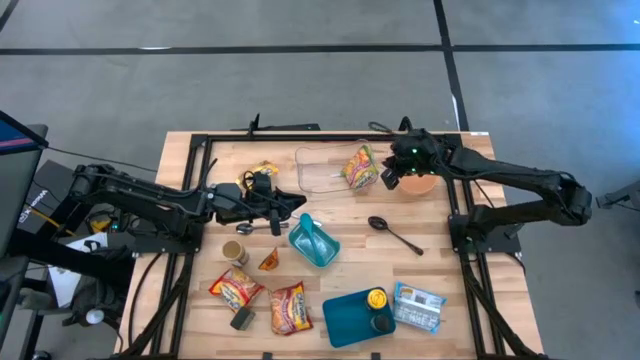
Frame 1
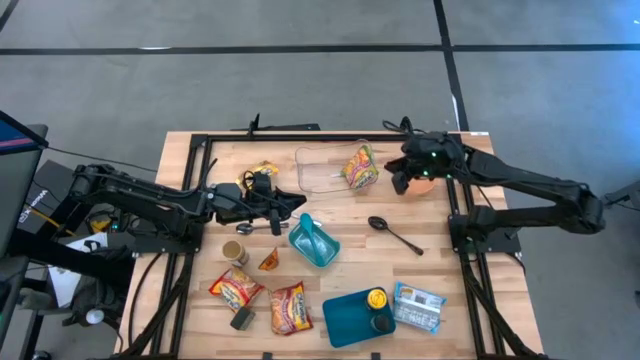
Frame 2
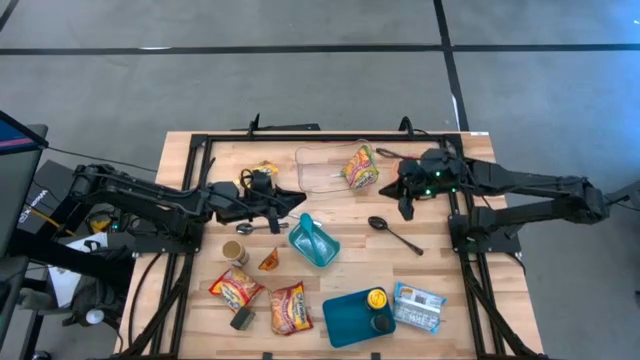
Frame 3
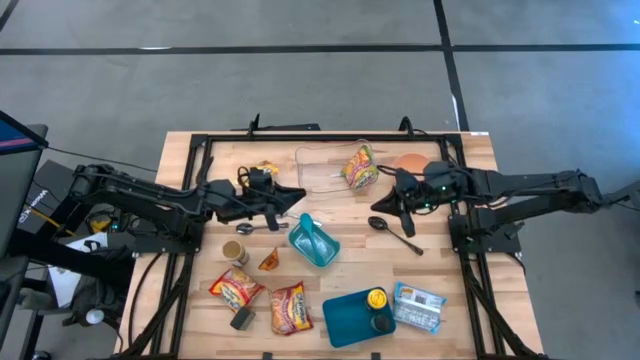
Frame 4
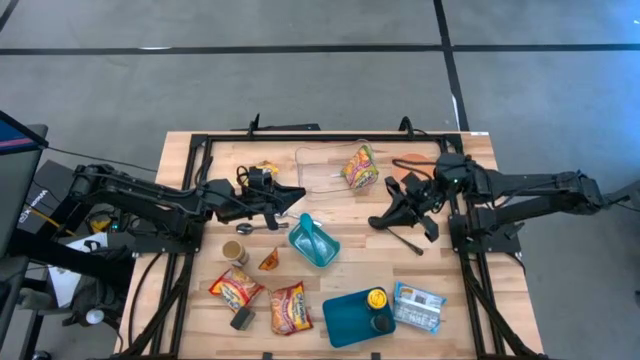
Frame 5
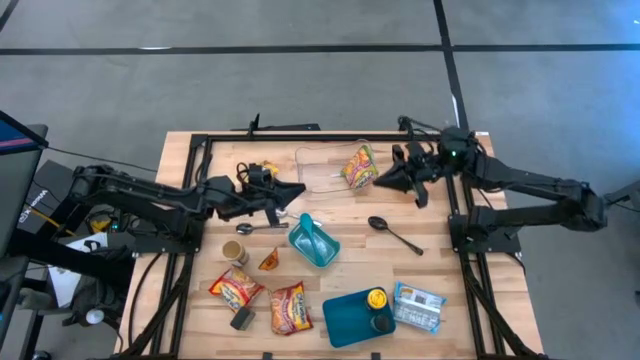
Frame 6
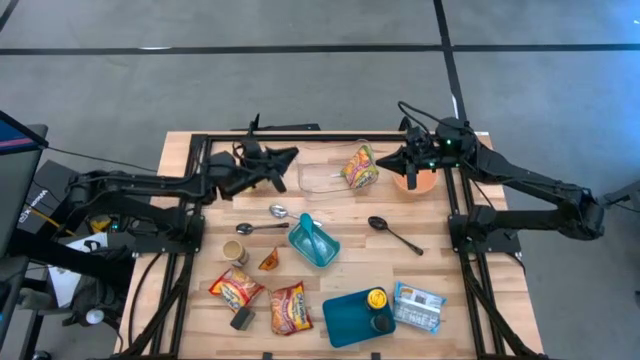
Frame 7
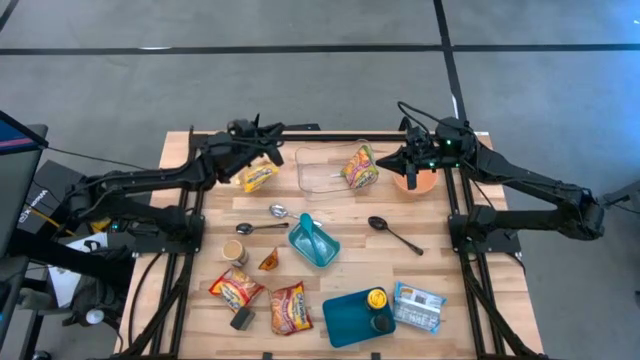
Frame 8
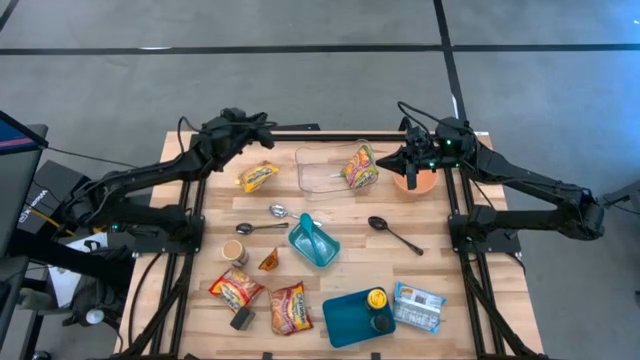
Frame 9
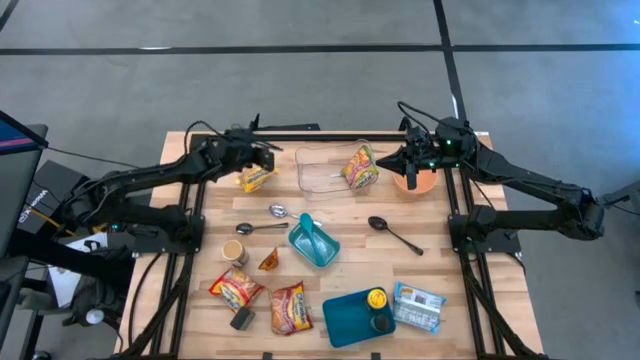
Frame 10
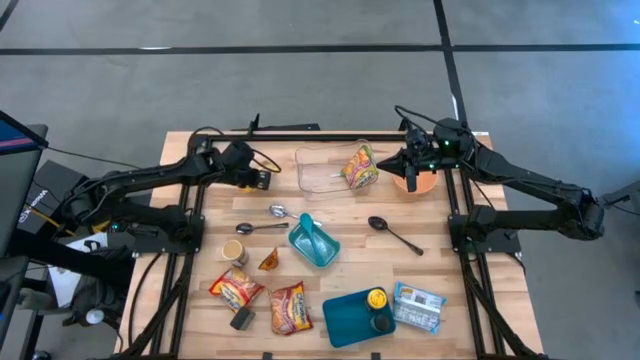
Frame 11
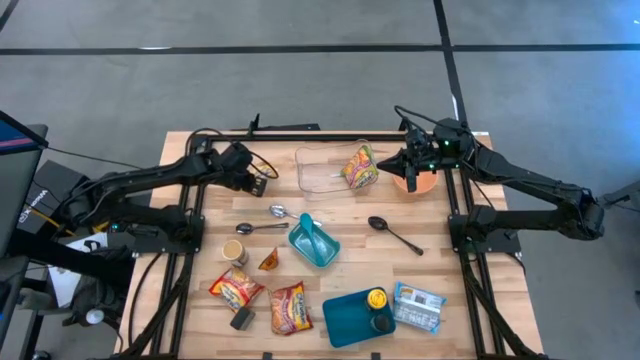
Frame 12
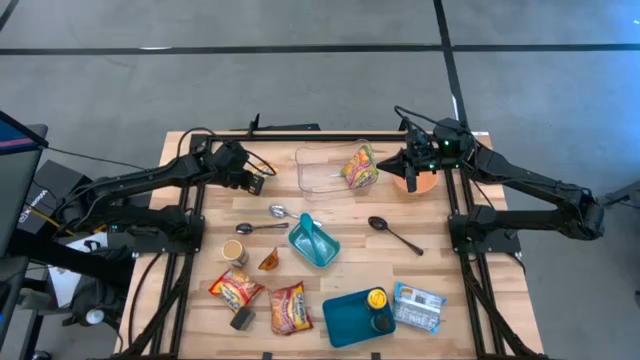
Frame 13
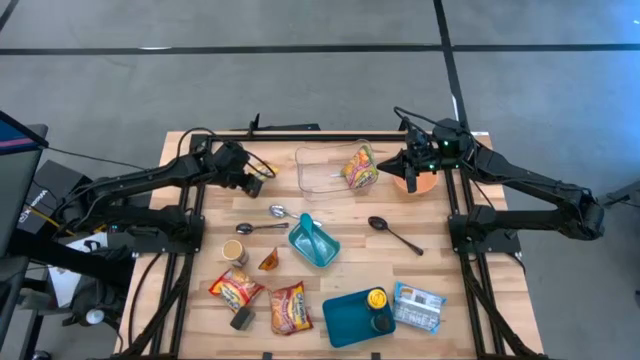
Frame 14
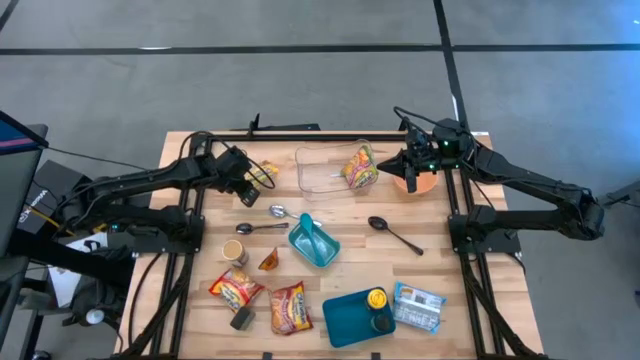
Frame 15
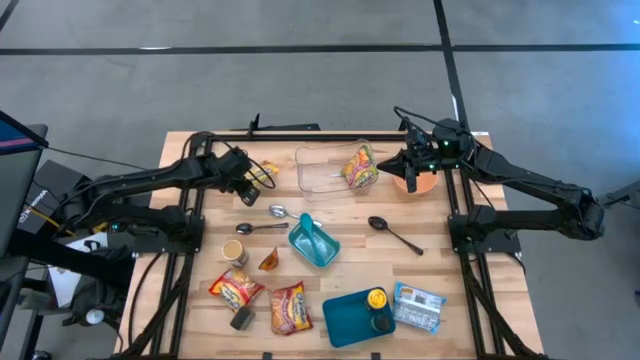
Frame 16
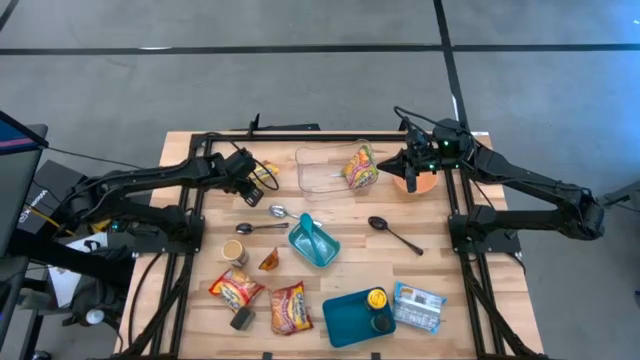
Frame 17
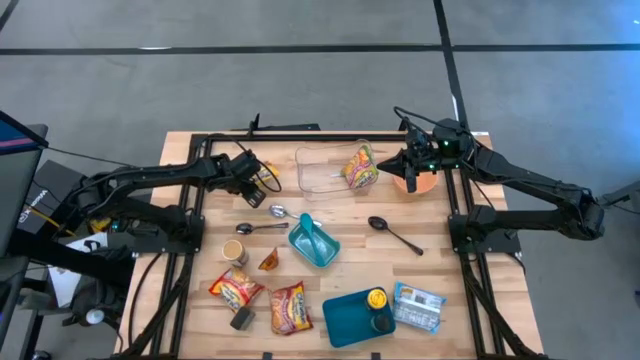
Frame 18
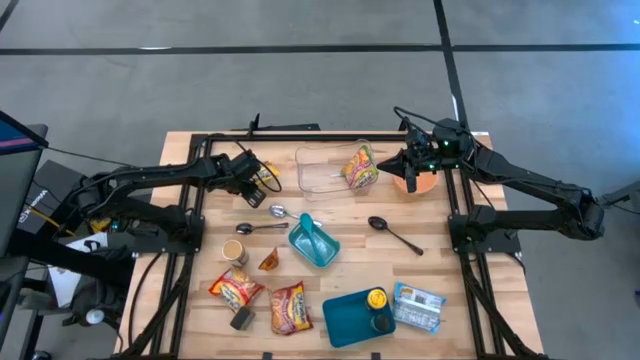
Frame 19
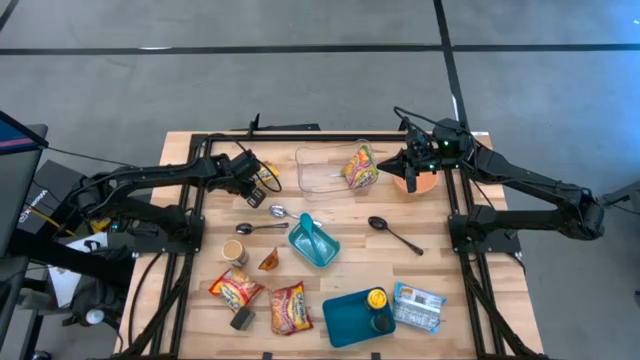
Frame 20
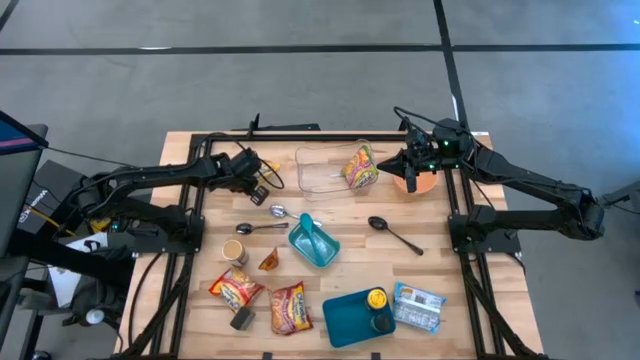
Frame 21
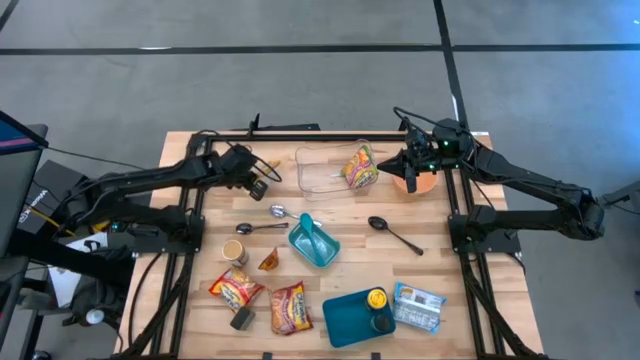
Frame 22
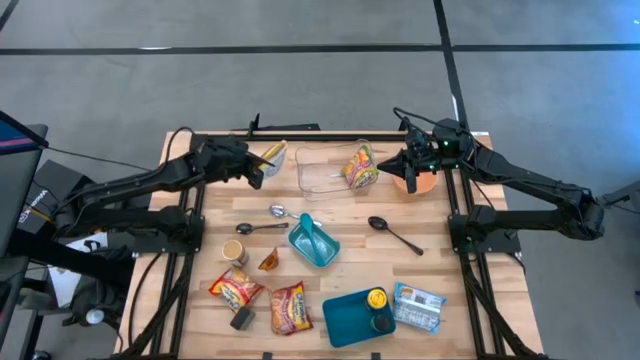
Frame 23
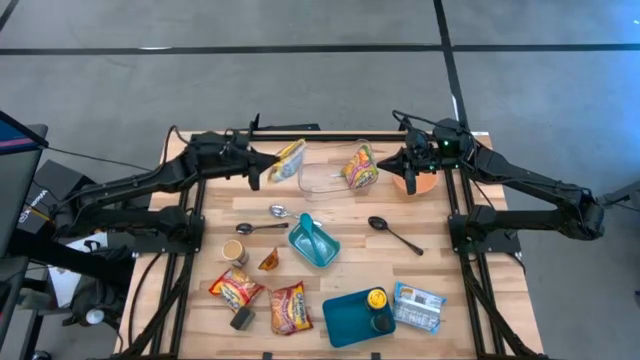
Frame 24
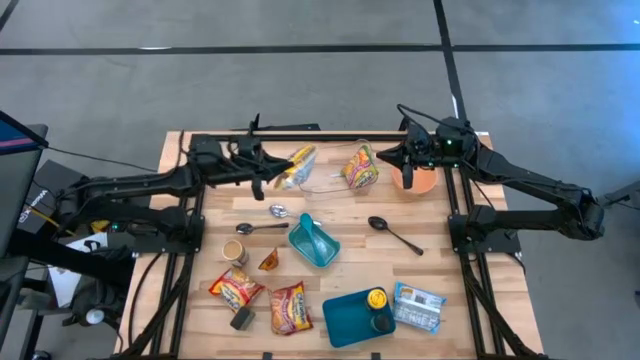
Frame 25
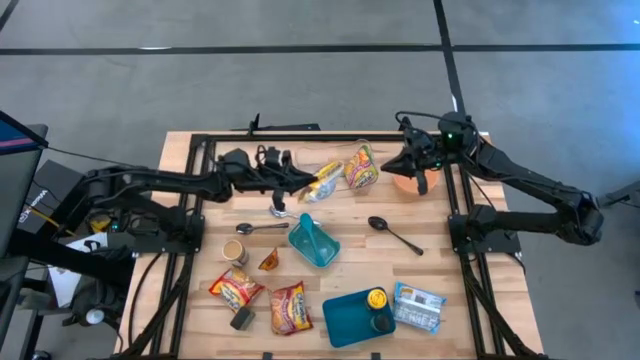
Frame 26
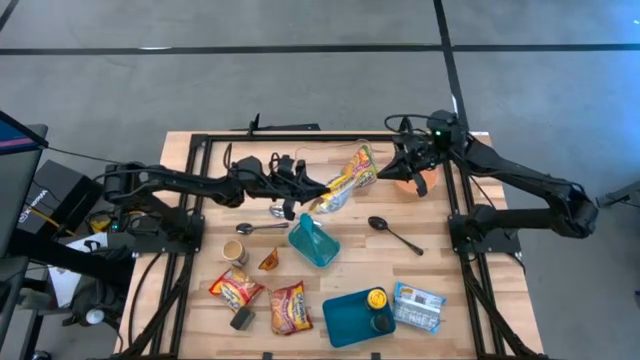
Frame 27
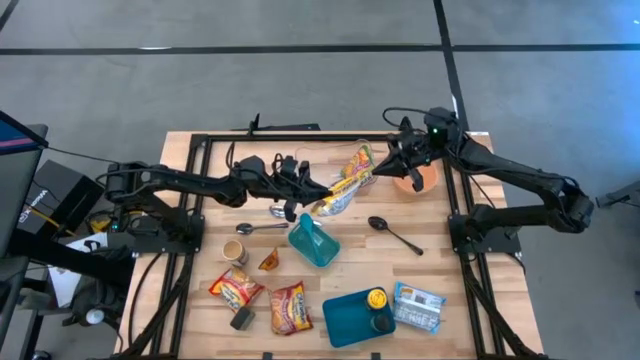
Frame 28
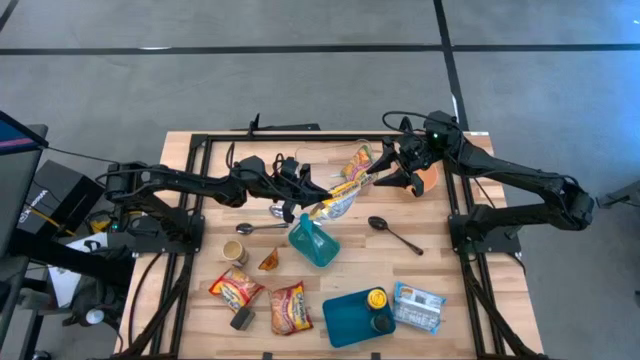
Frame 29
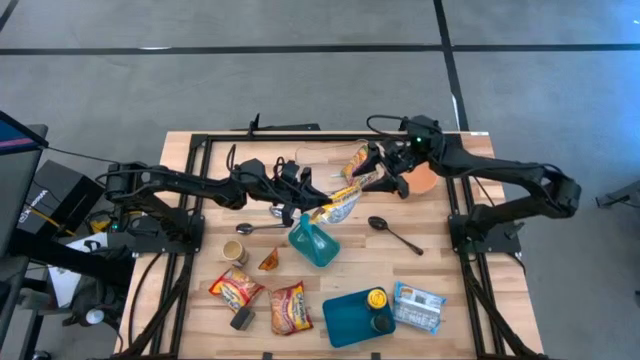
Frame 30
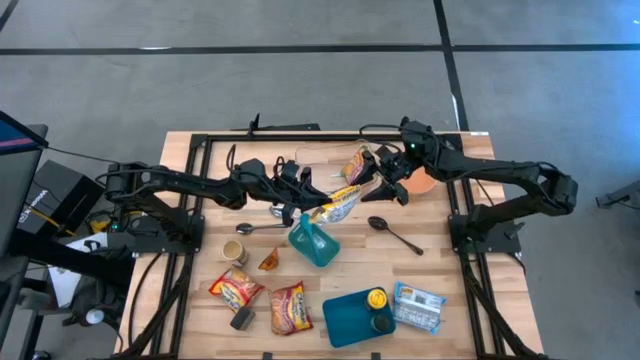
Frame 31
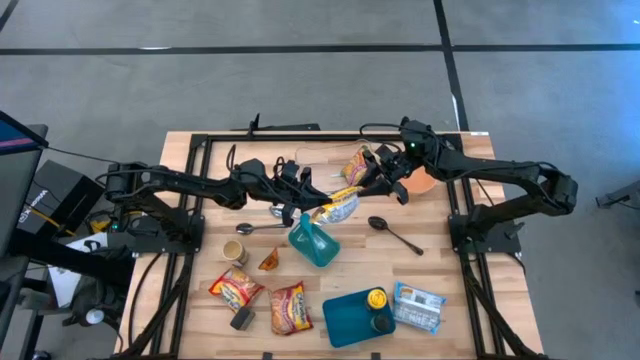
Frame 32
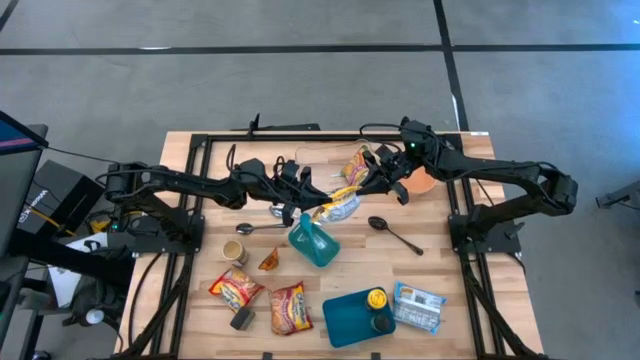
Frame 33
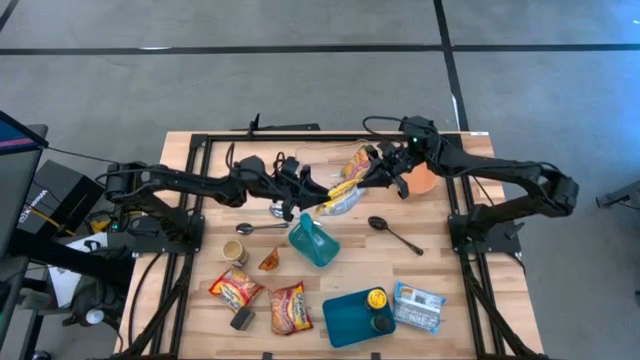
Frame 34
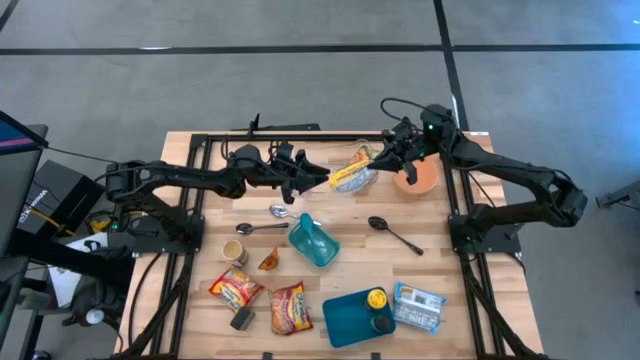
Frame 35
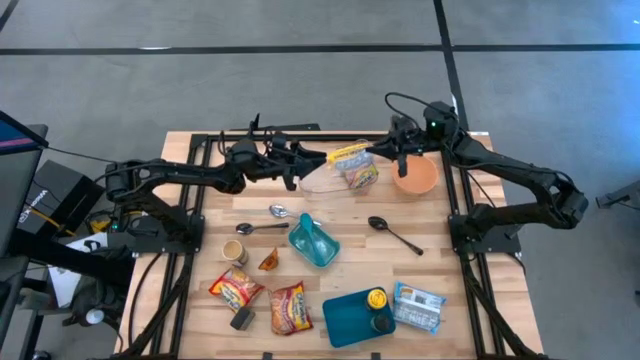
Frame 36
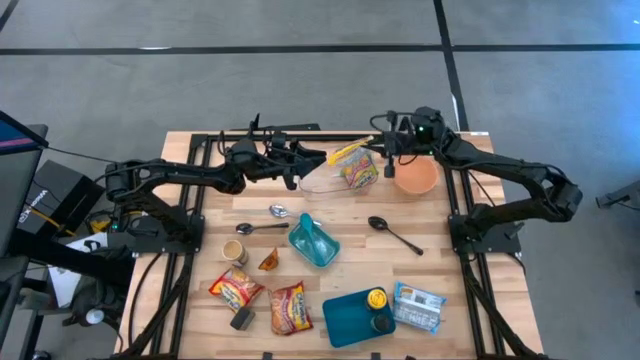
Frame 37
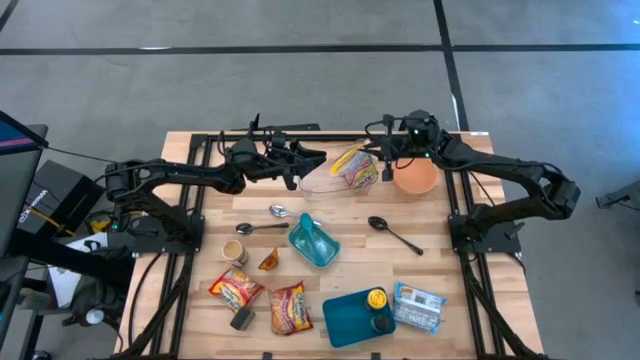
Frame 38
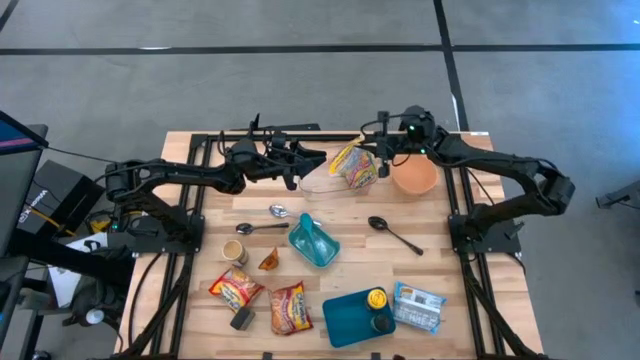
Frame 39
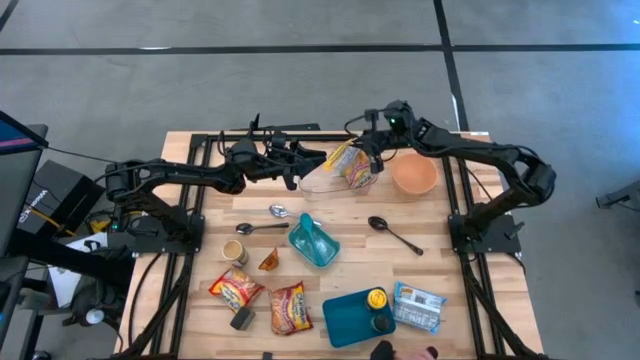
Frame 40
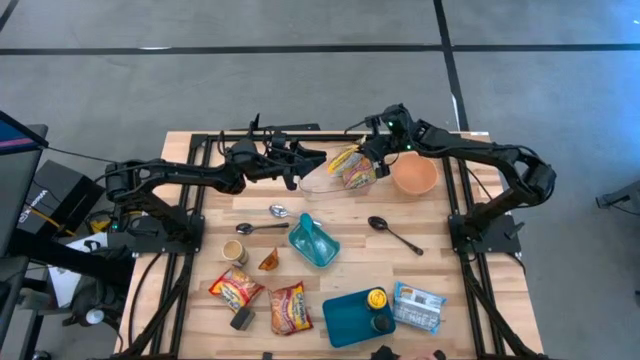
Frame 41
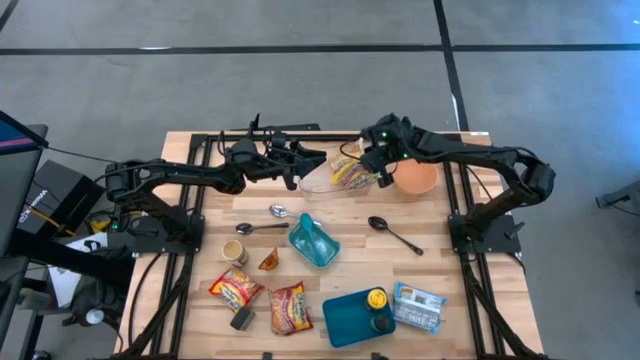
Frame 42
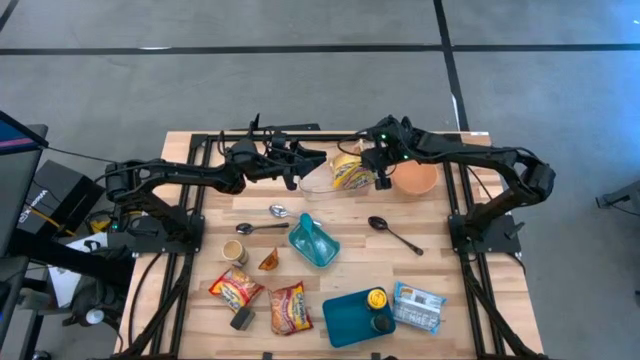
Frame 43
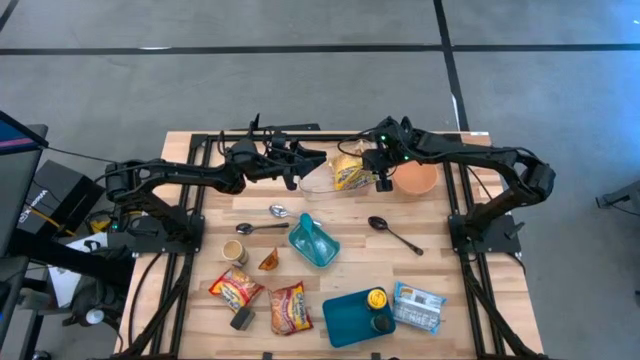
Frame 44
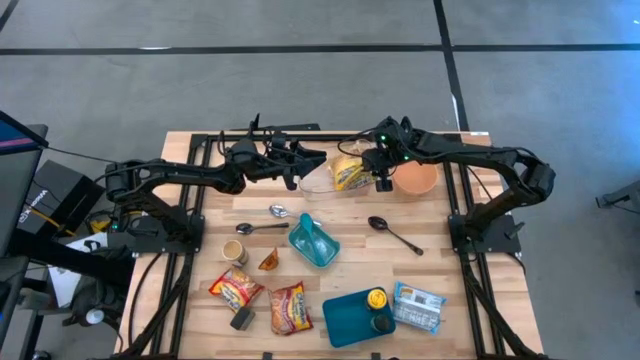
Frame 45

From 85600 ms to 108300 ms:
Task: Pick & Place Food Item
Put the yellow noodle pack into the transparent bin
